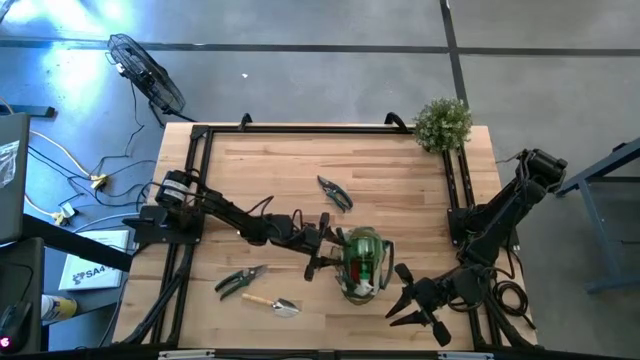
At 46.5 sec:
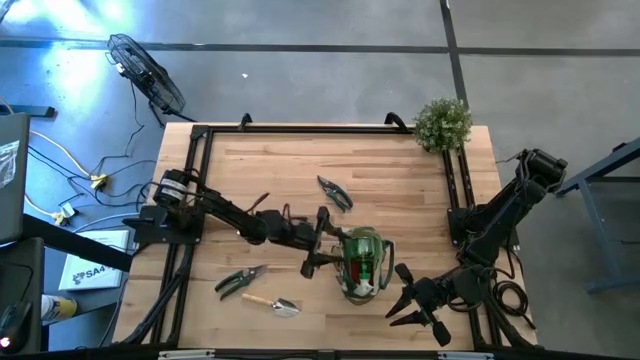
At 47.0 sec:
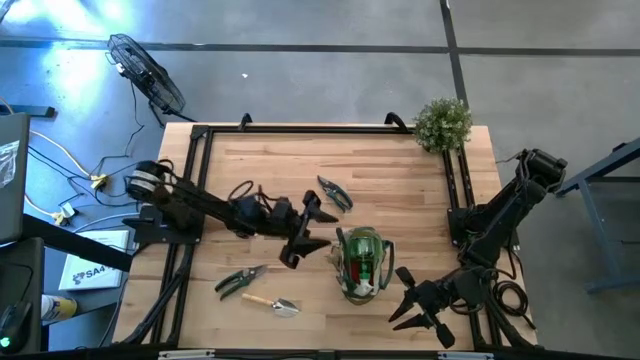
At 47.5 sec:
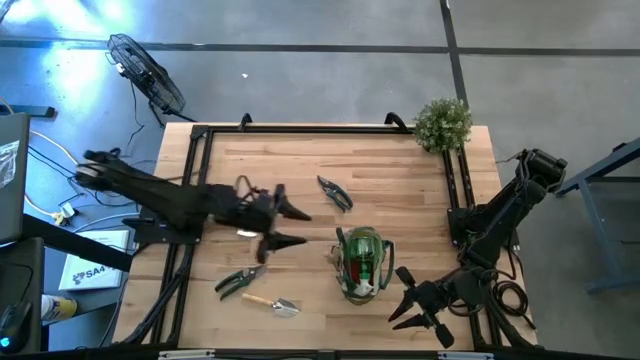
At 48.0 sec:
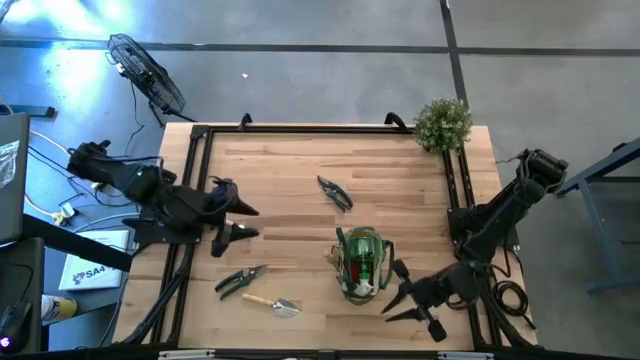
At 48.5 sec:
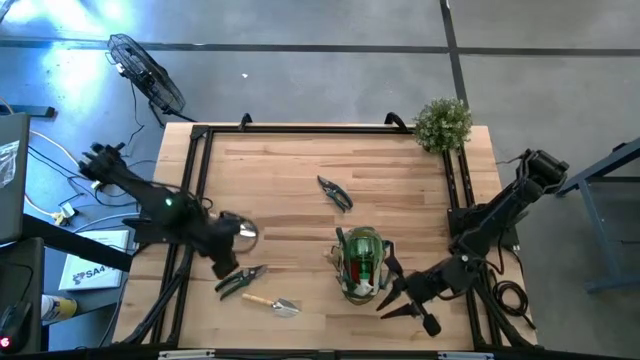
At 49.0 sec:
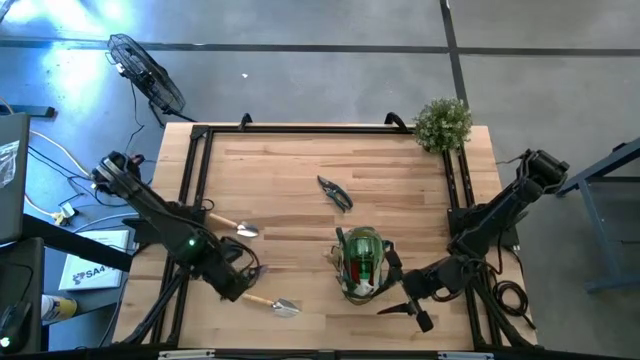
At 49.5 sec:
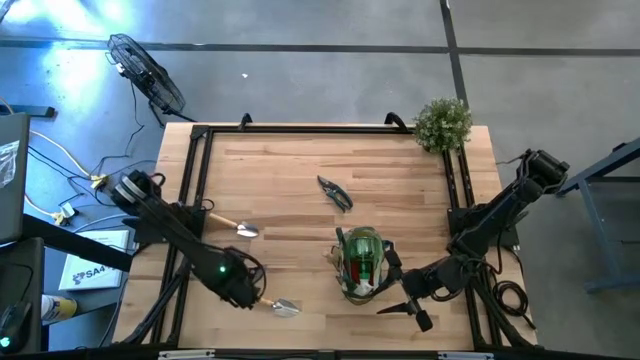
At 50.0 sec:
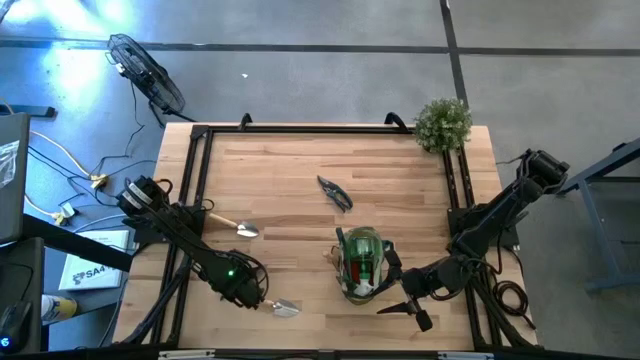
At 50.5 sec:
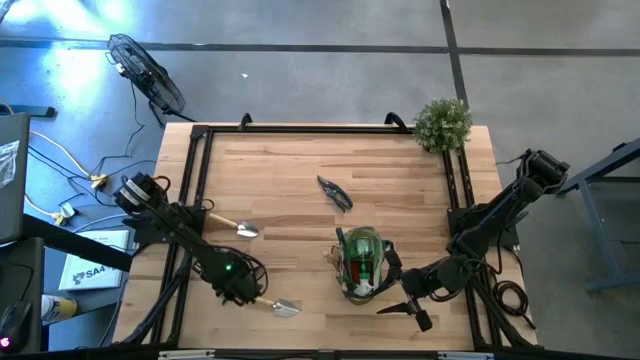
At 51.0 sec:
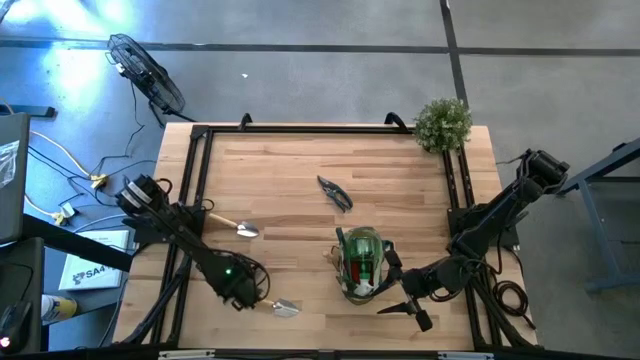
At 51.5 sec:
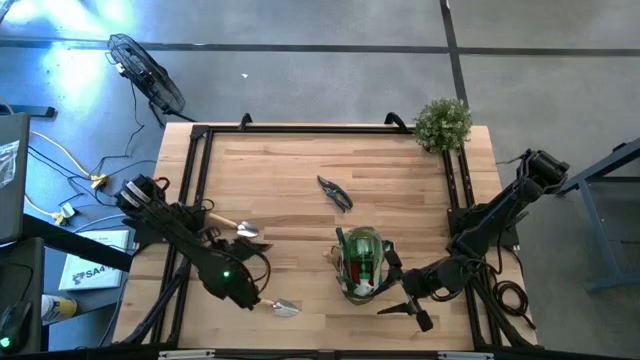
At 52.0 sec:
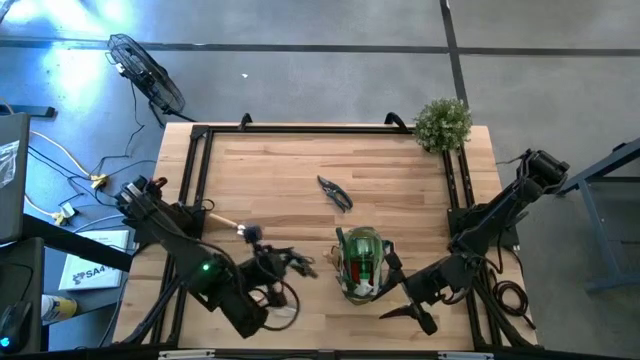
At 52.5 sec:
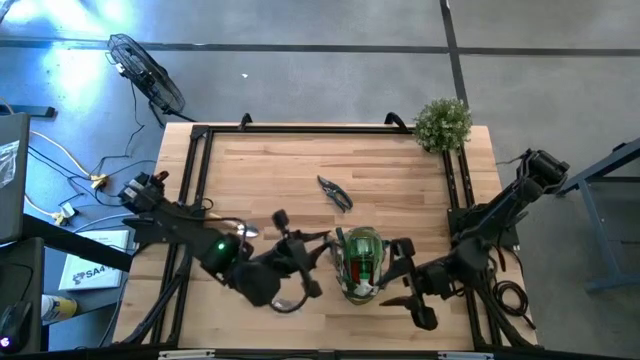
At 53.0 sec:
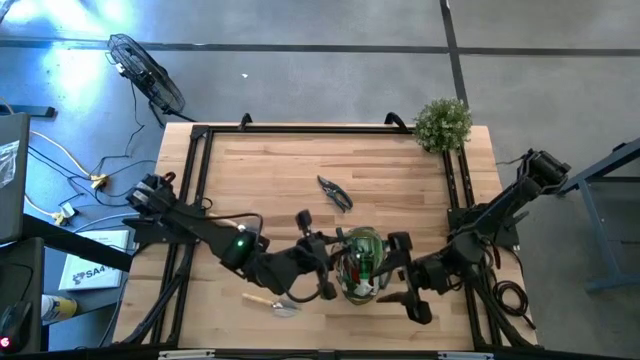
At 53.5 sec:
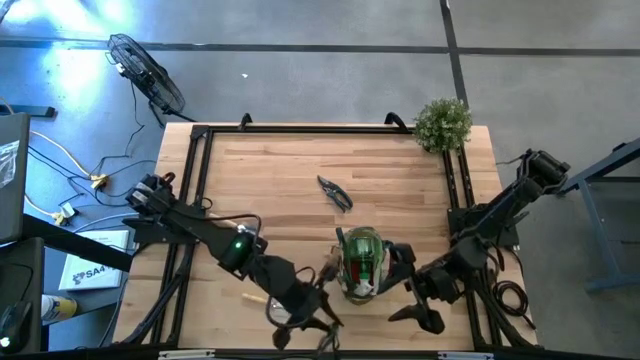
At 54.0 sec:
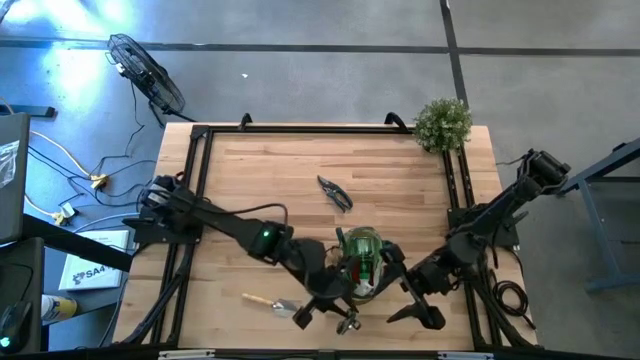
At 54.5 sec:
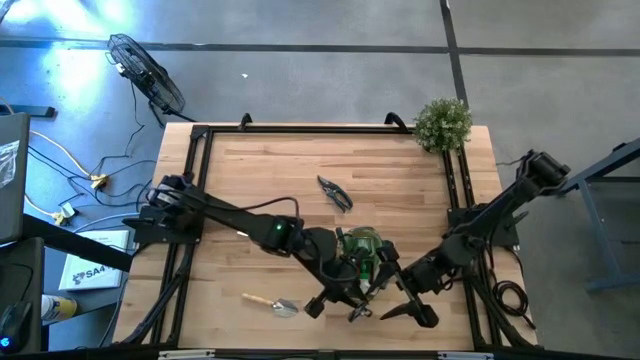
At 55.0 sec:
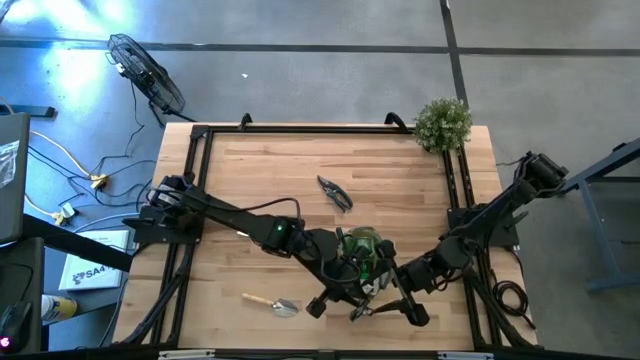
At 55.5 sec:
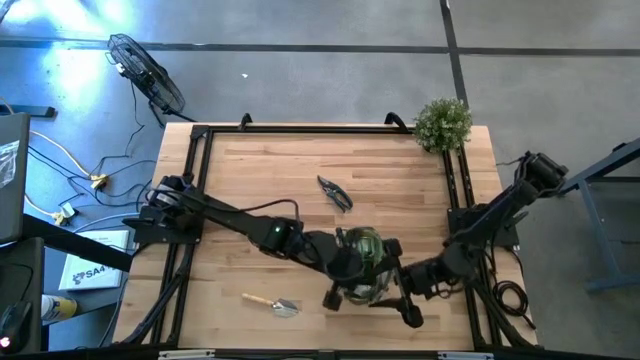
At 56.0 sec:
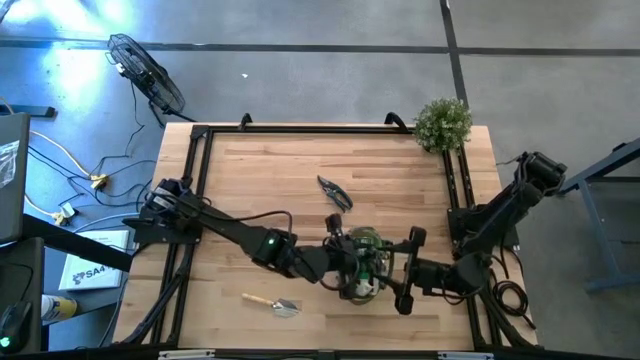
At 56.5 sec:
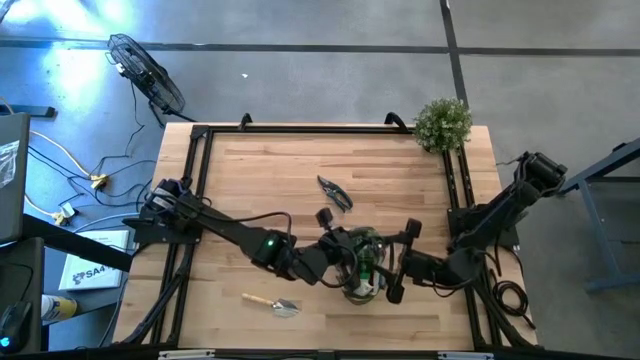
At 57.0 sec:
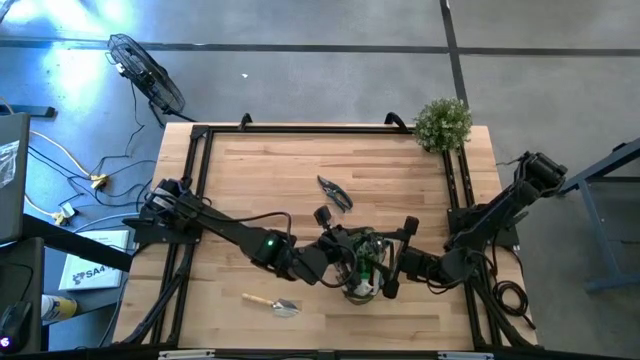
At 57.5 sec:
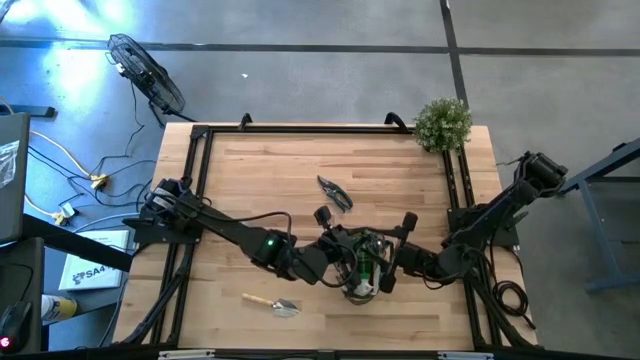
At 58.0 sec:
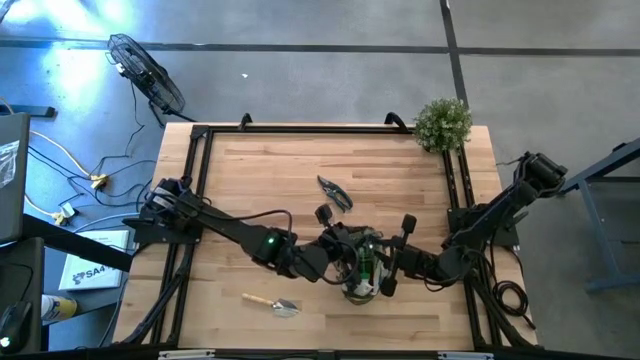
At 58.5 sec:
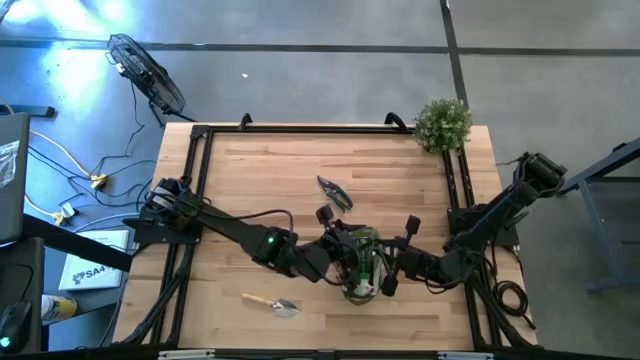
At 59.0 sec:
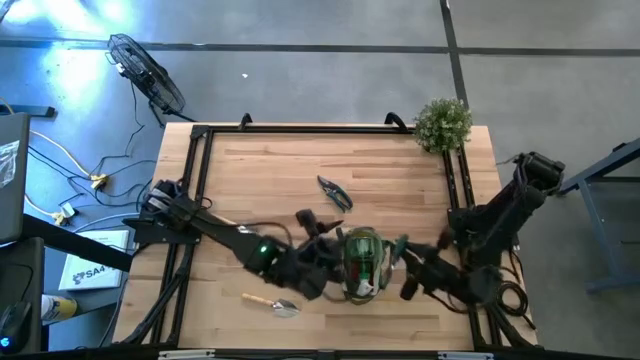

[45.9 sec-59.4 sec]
Task: Pick & Place Garden tools in Gardening bag
Put the bottom green shear scissors into the gardening bag
